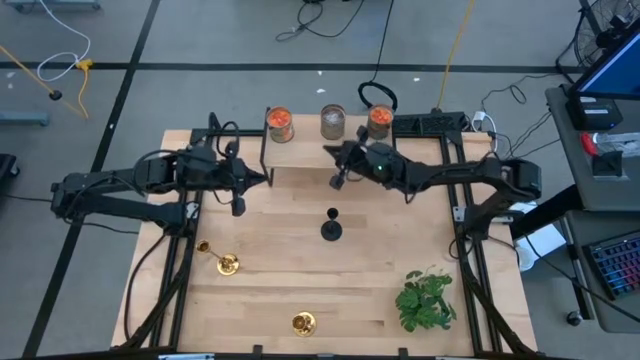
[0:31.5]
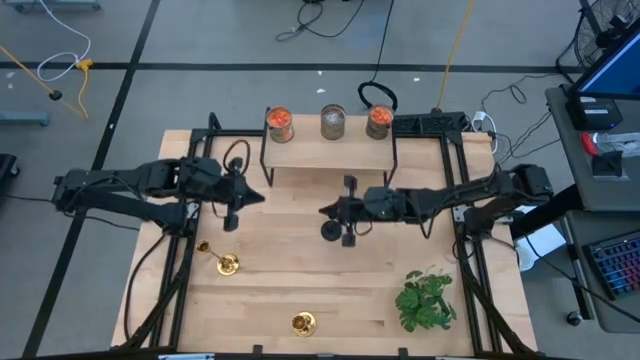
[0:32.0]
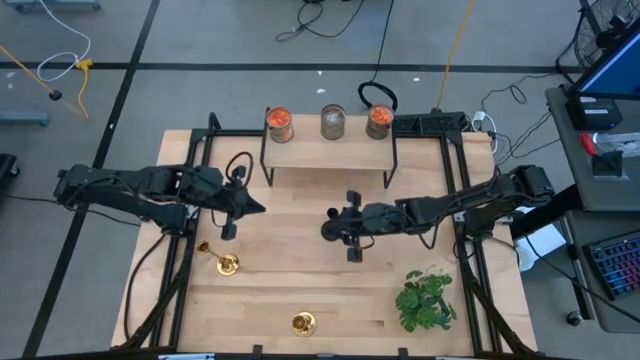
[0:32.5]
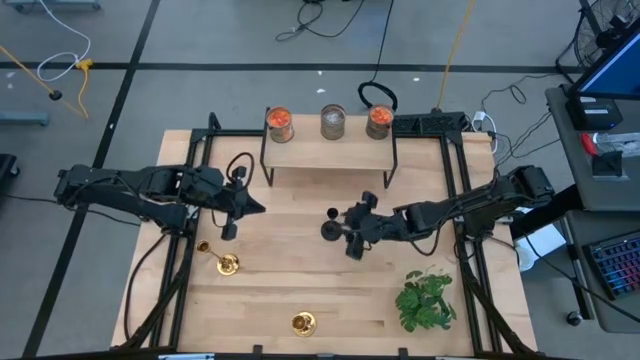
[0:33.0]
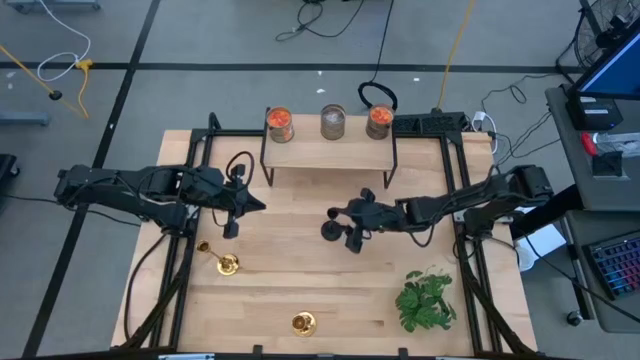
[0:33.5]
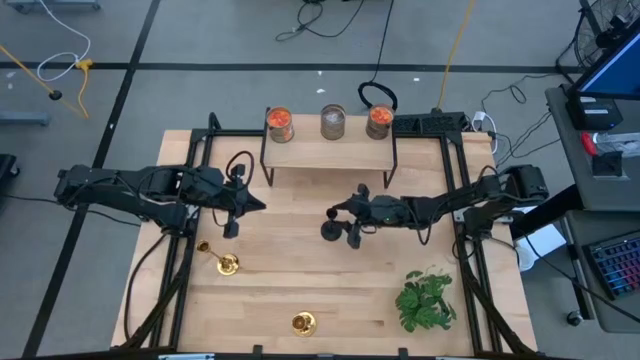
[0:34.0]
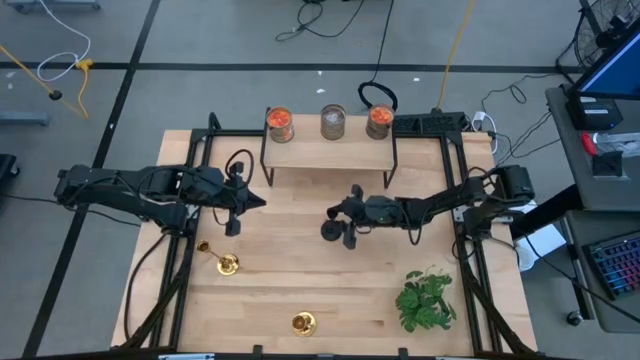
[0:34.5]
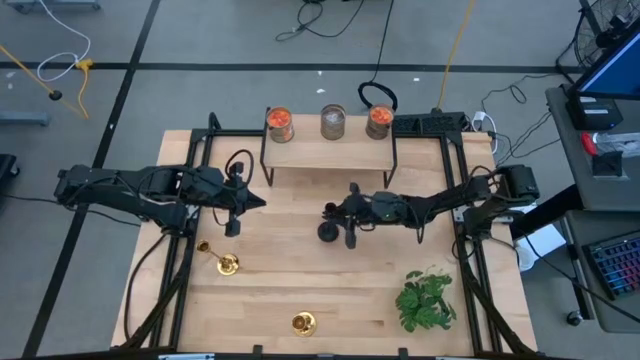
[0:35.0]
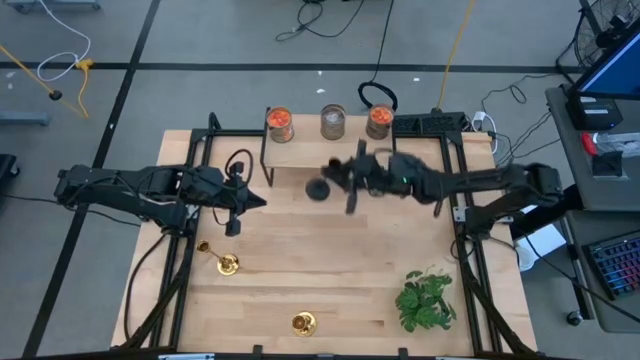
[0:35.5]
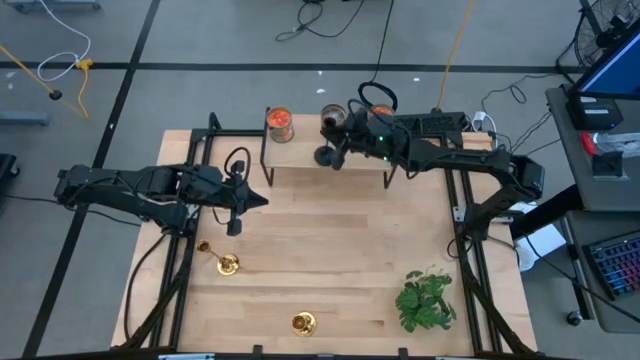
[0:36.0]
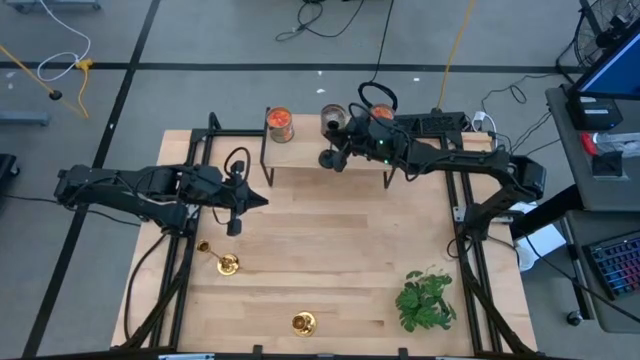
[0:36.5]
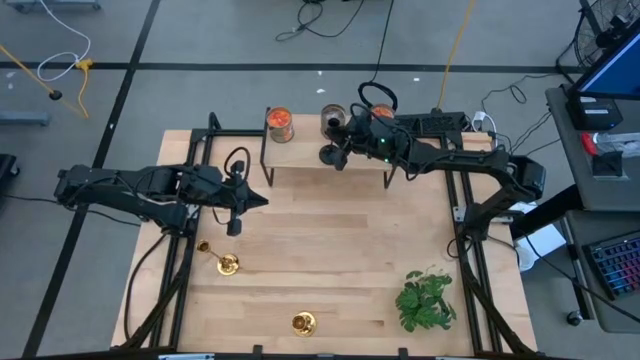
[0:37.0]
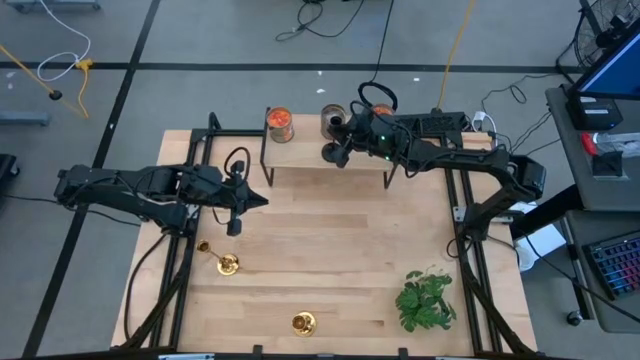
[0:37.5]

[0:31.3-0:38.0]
Task: Pick & Place candle stick holders
Put the black candle holder on the shelf

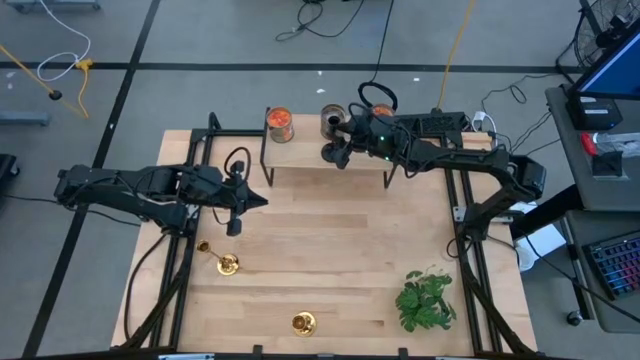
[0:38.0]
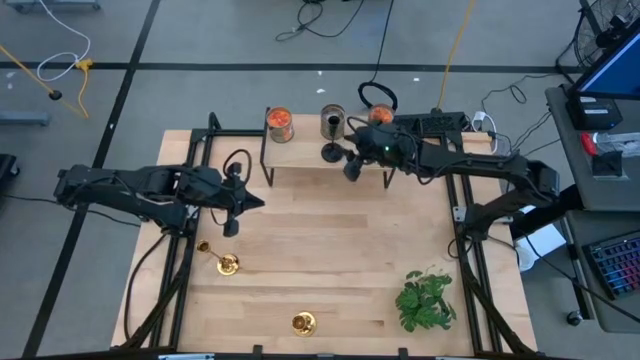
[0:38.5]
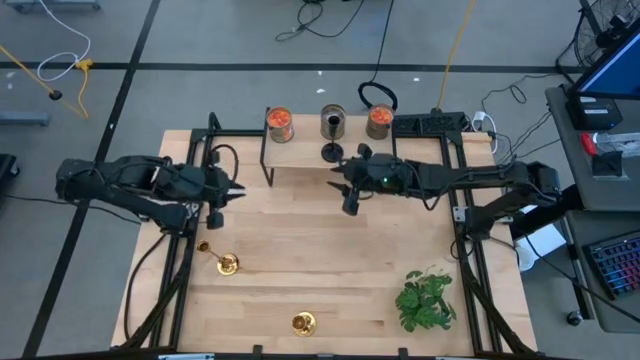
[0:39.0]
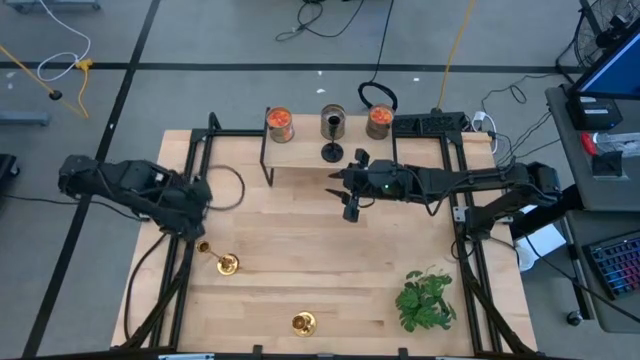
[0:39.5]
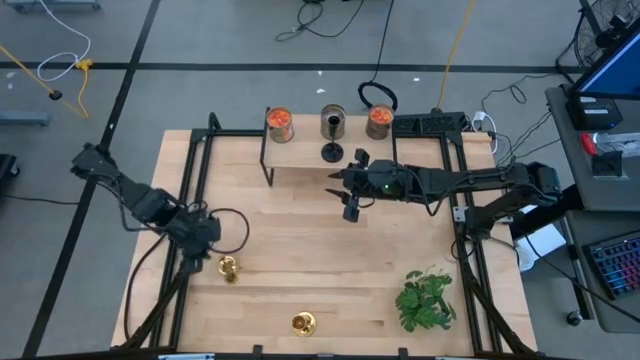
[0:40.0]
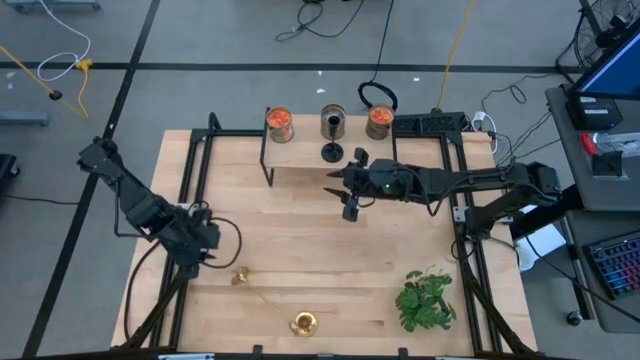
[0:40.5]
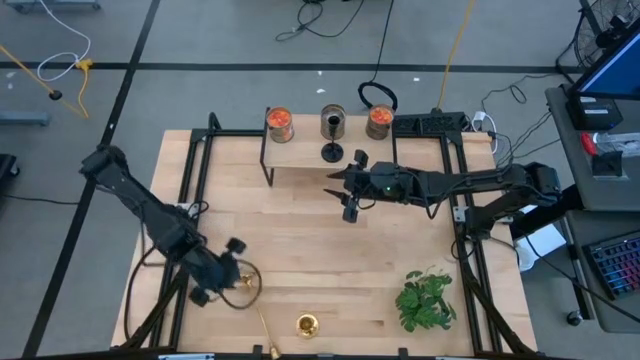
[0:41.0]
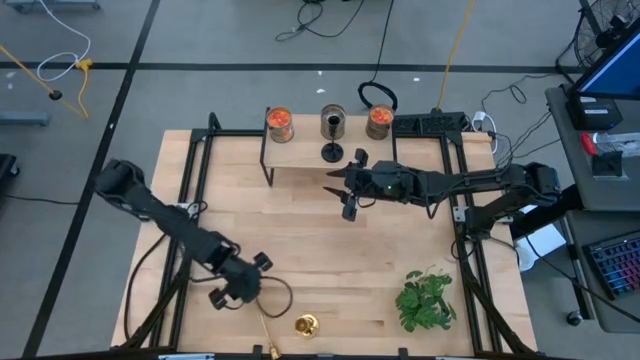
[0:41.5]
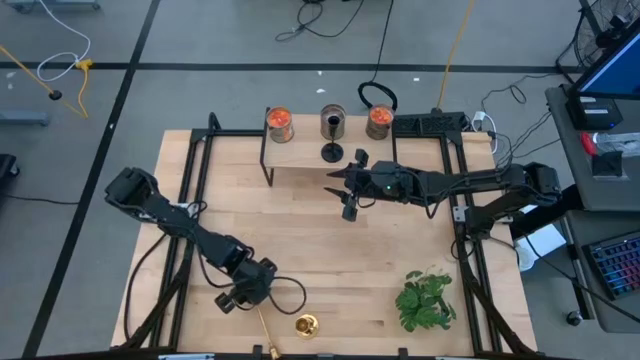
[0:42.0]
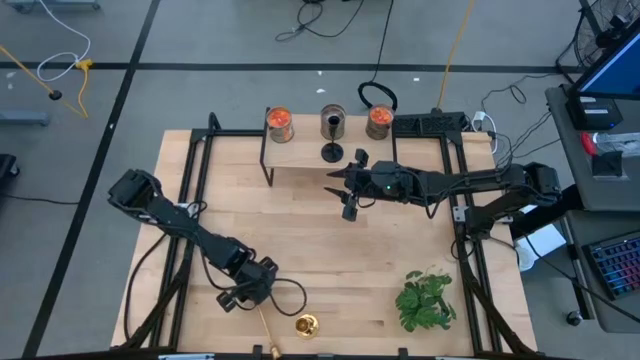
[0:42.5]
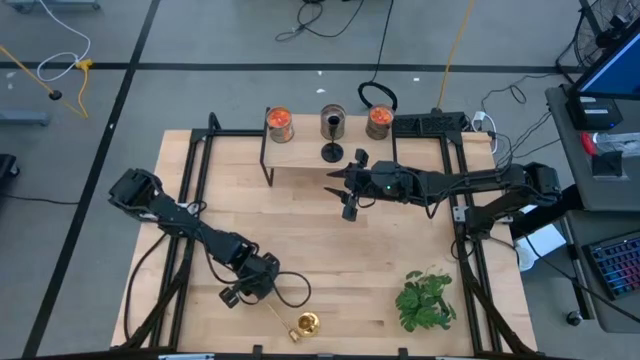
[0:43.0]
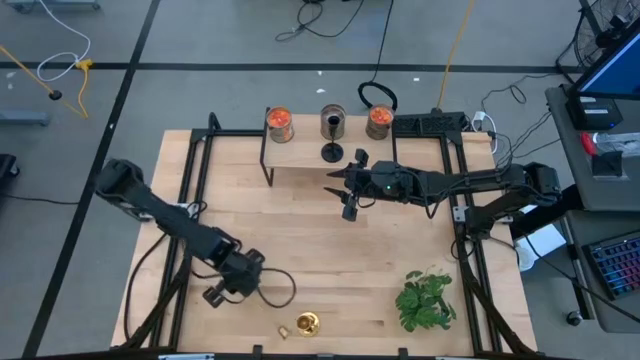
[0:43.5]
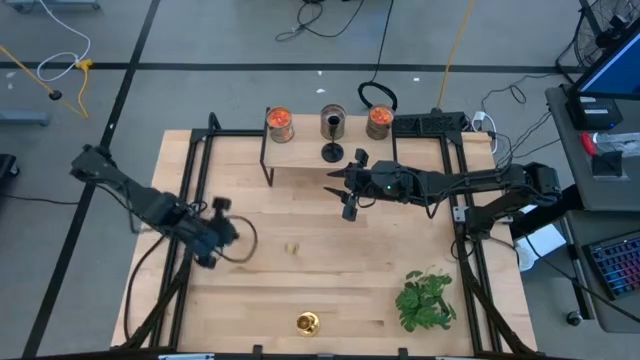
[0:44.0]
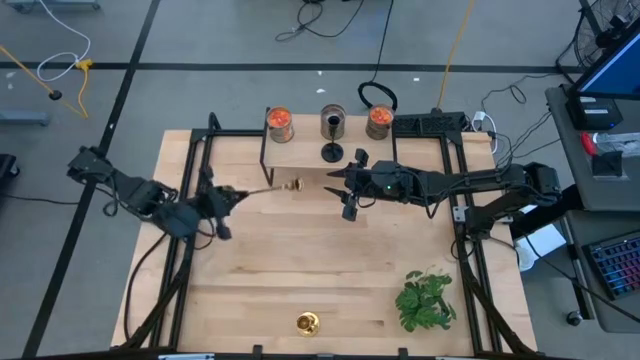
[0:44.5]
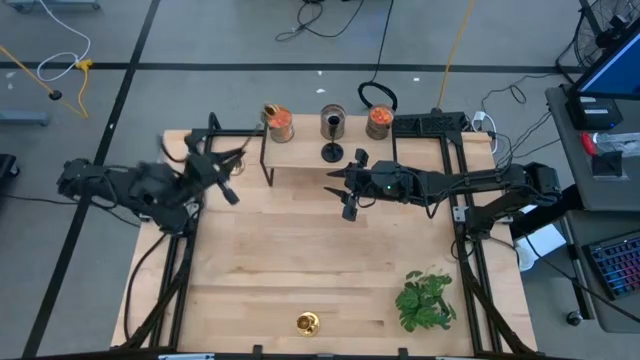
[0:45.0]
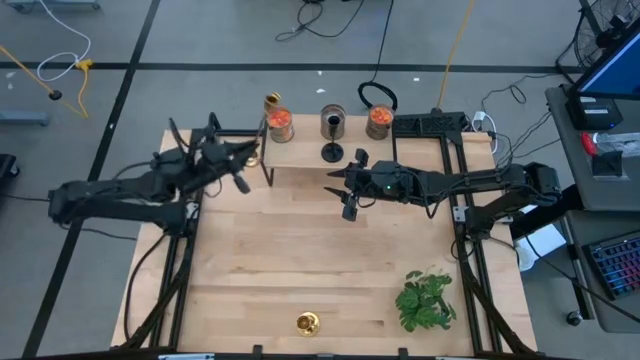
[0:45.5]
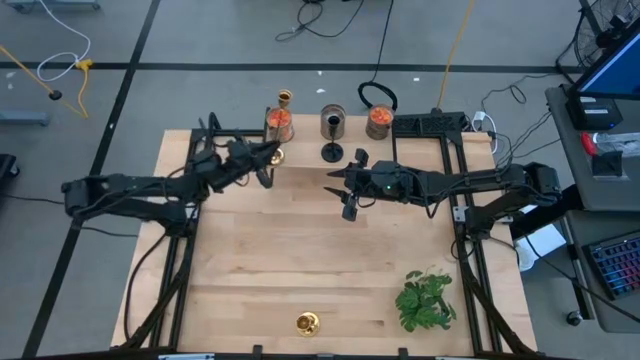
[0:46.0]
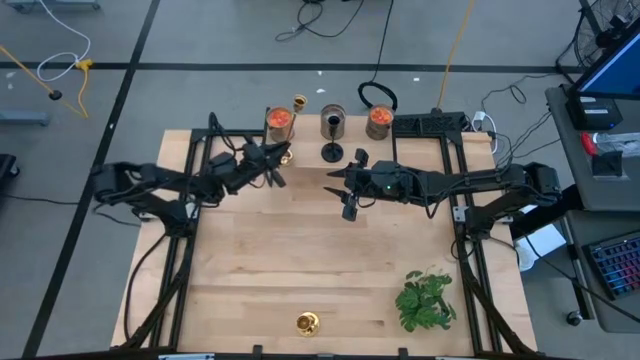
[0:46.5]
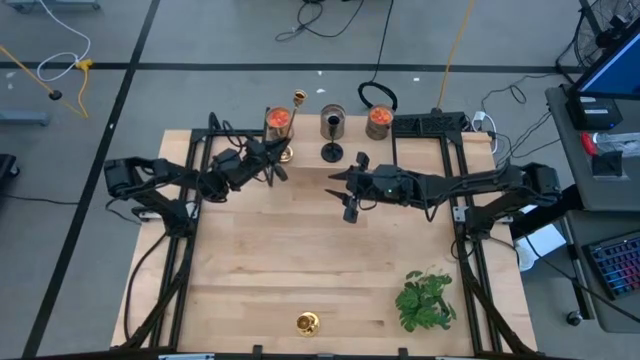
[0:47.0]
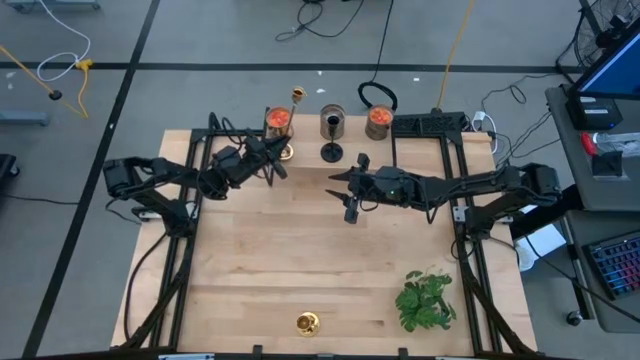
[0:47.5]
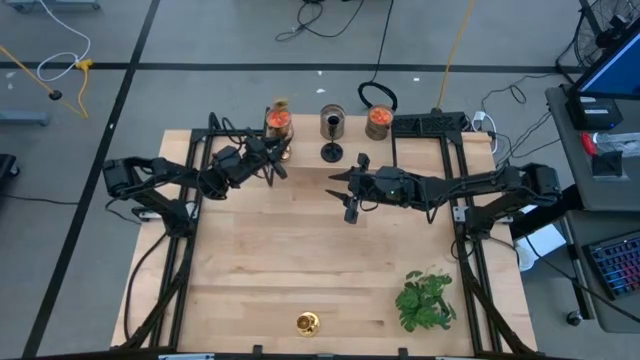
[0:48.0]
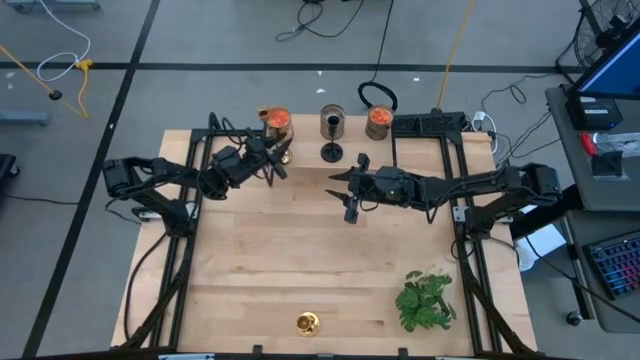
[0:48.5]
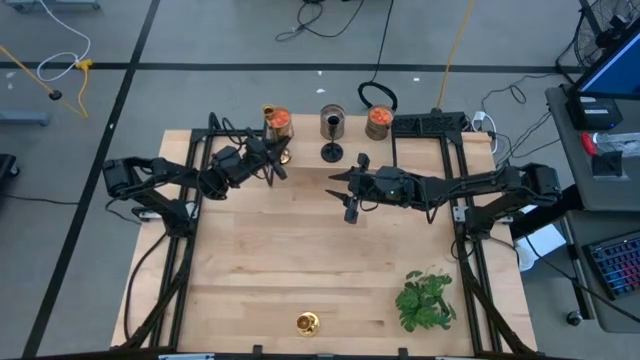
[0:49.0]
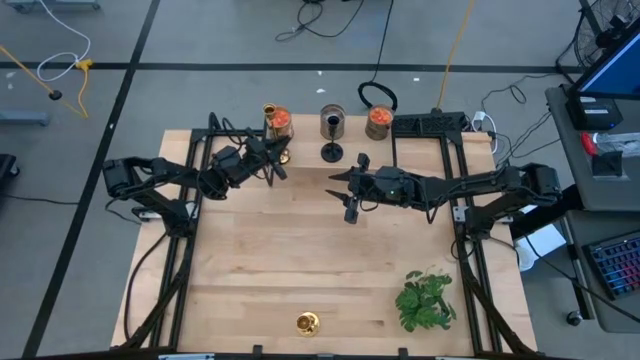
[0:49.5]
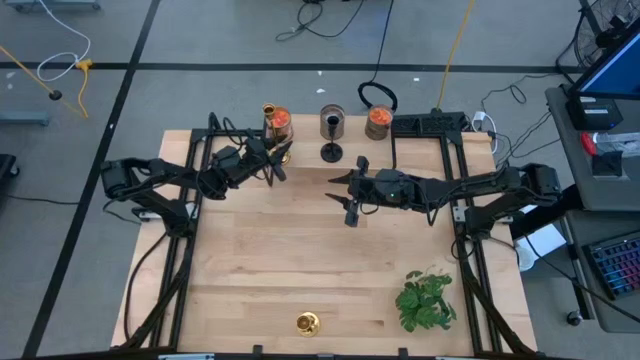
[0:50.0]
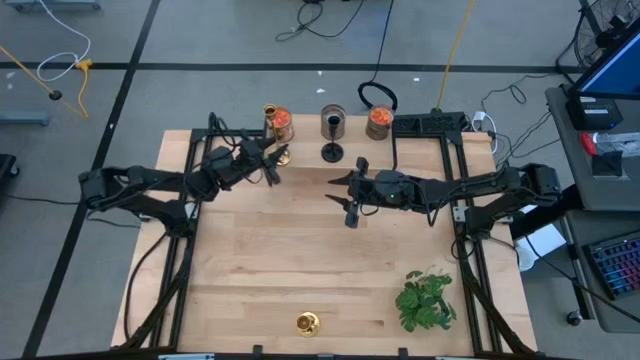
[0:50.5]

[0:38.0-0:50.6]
Align the left gold candle holder with the other candle holder

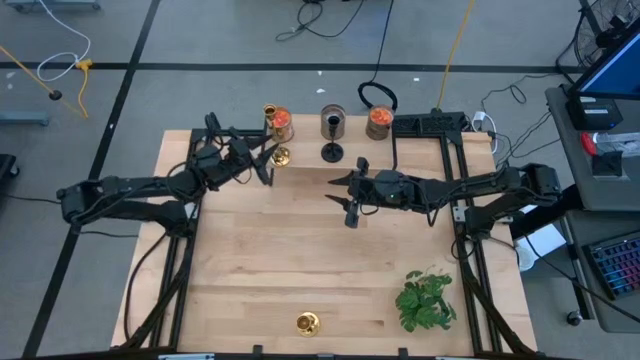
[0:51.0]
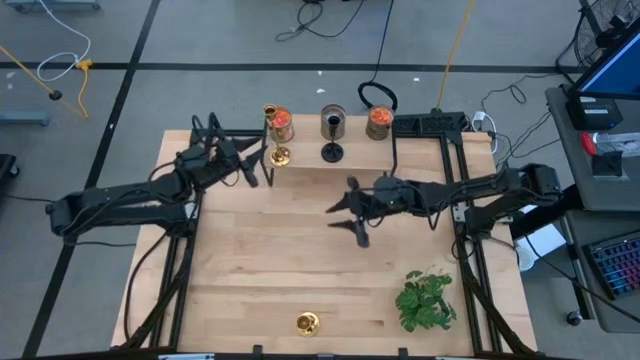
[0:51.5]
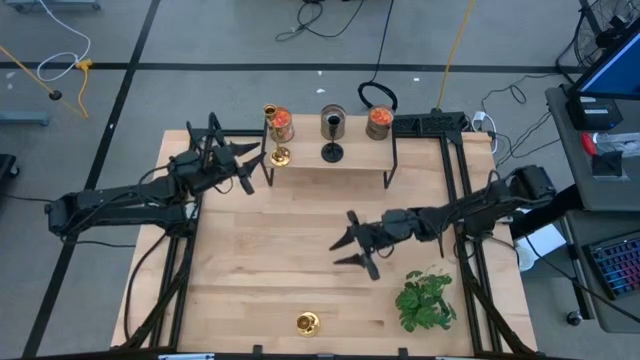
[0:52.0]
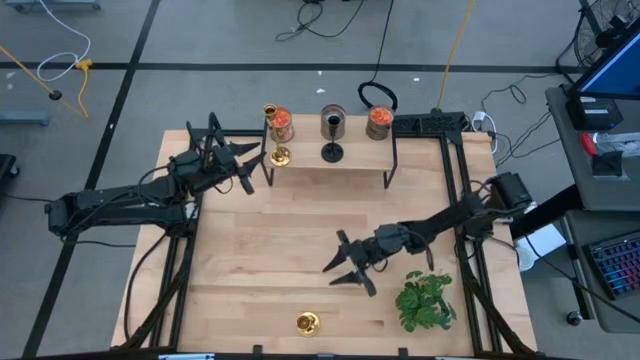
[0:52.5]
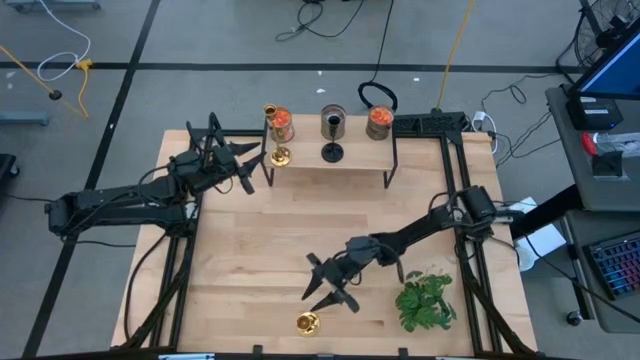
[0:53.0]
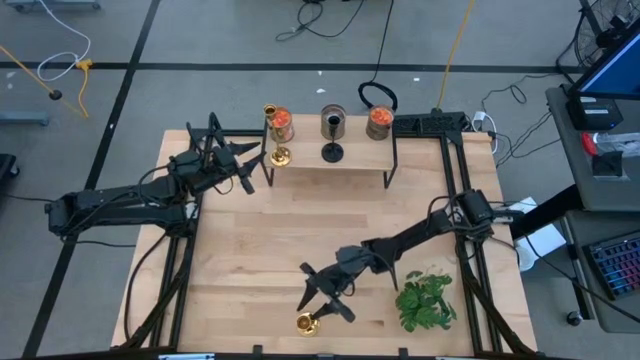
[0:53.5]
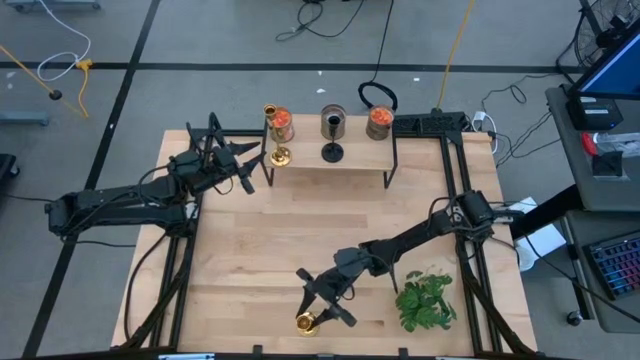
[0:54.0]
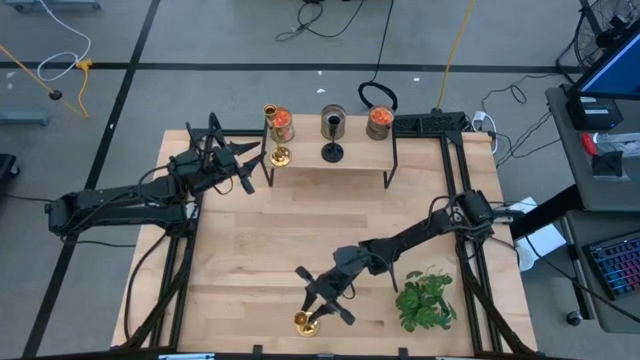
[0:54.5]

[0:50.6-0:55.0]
Align the gold candle holder with the other candle holders
